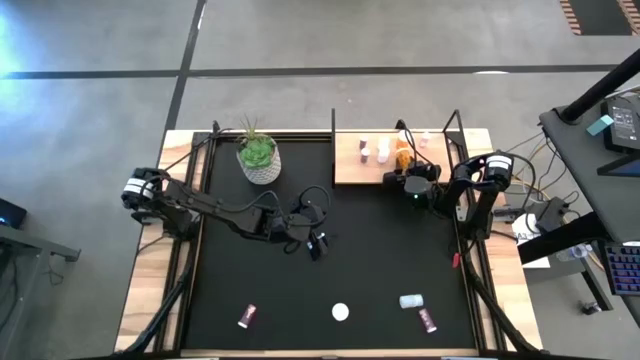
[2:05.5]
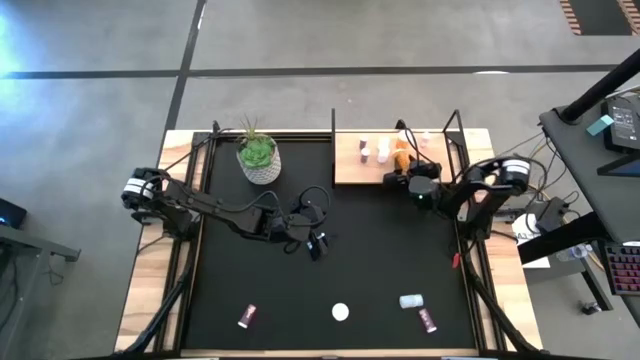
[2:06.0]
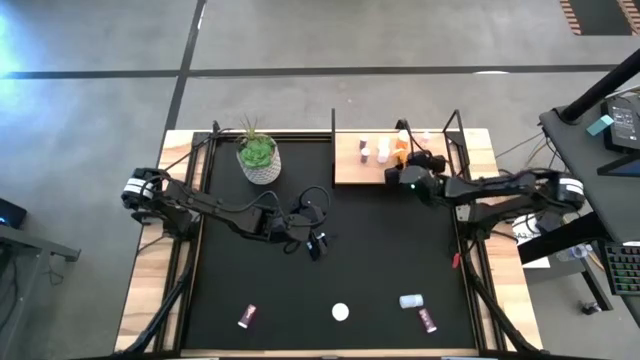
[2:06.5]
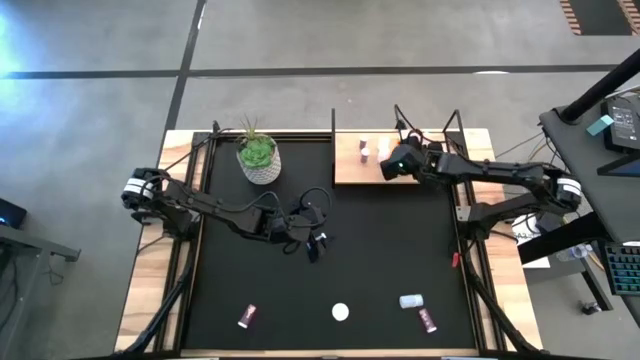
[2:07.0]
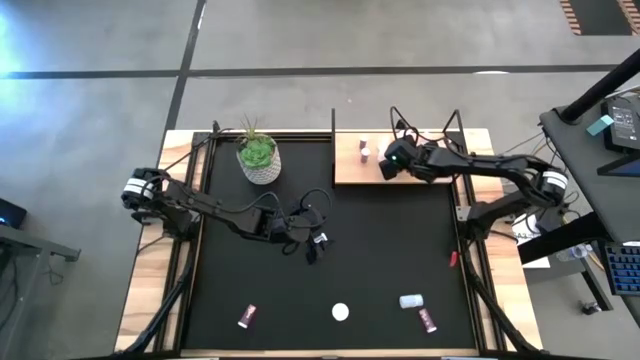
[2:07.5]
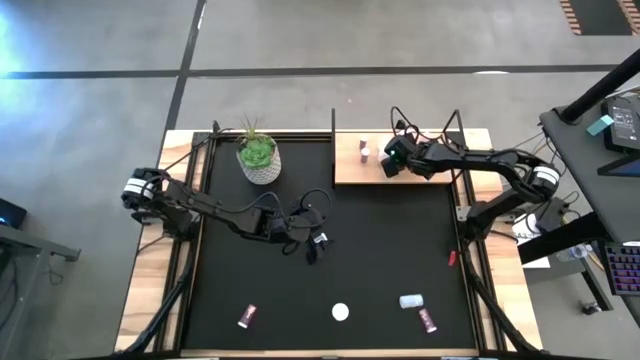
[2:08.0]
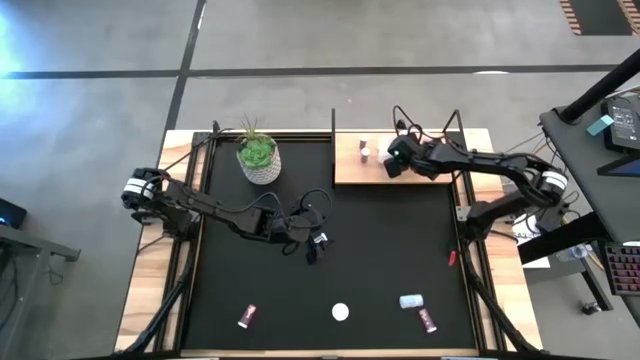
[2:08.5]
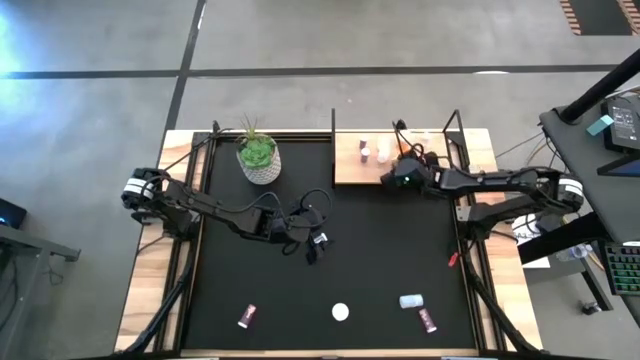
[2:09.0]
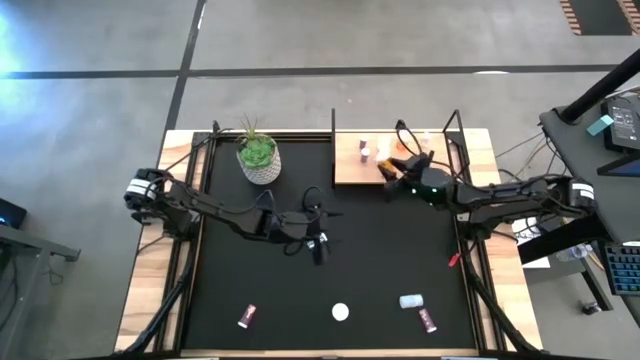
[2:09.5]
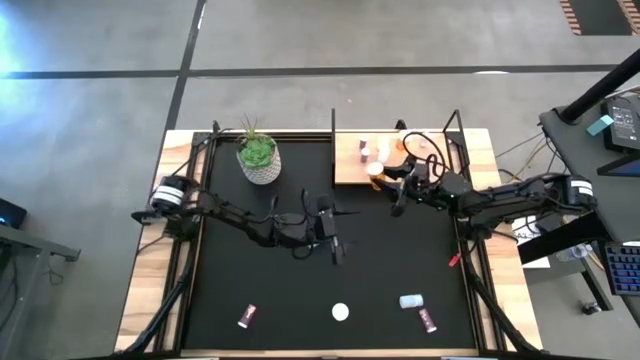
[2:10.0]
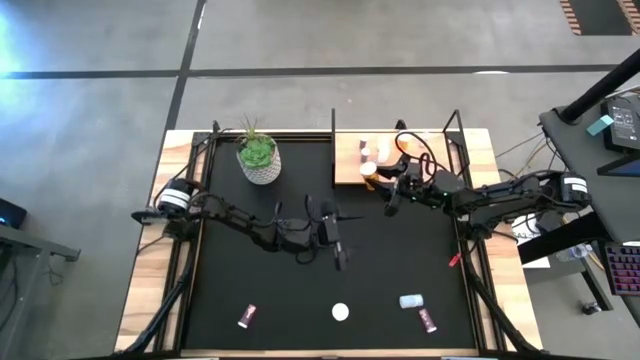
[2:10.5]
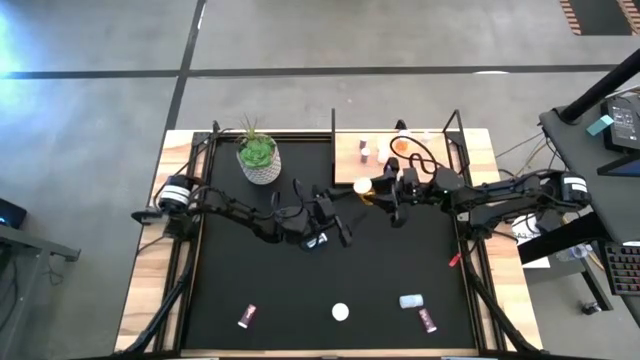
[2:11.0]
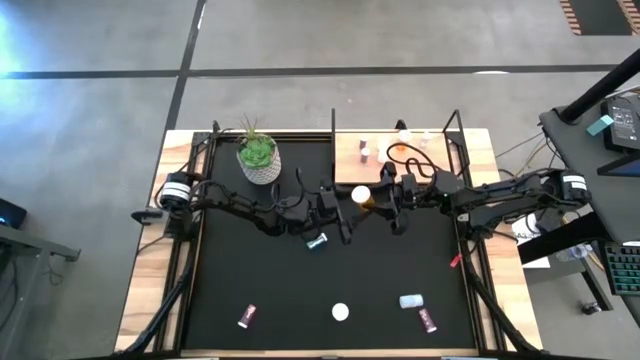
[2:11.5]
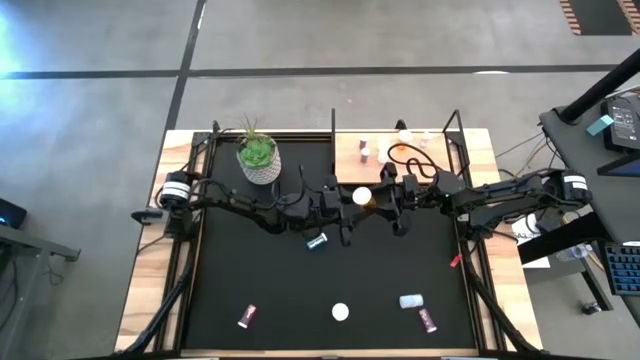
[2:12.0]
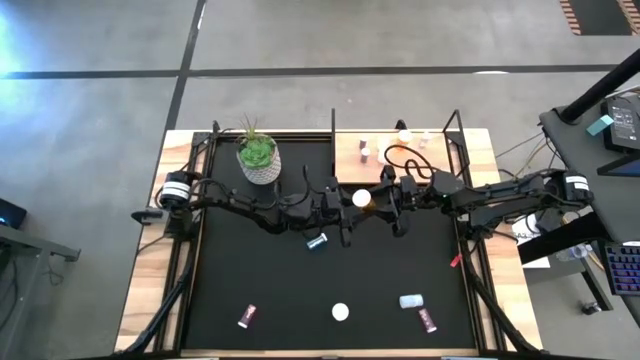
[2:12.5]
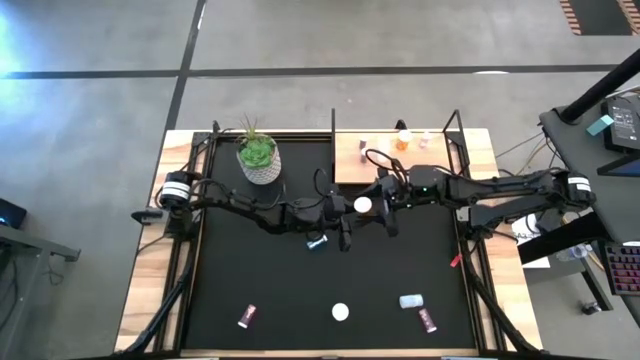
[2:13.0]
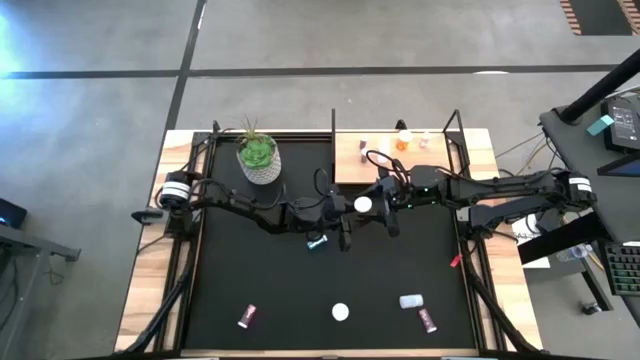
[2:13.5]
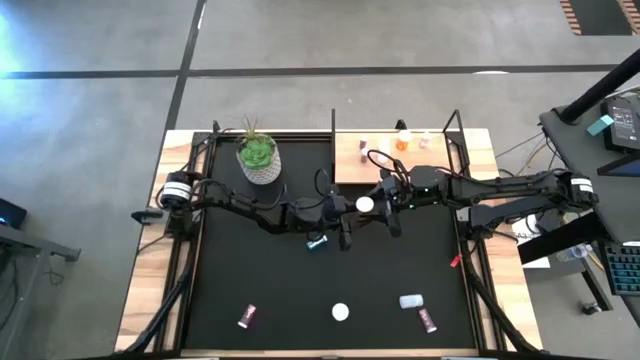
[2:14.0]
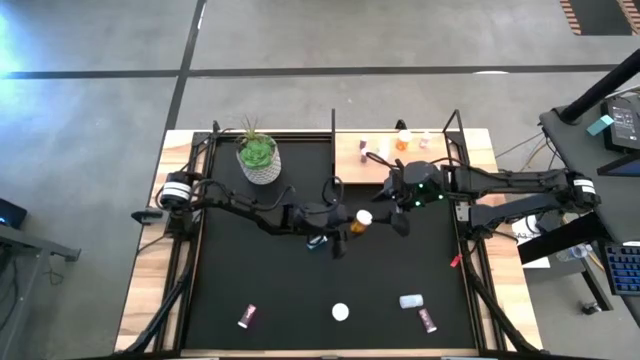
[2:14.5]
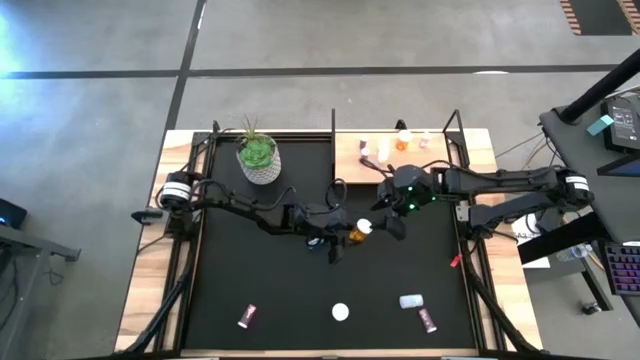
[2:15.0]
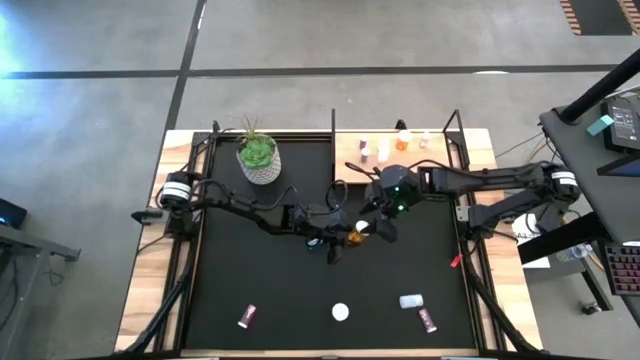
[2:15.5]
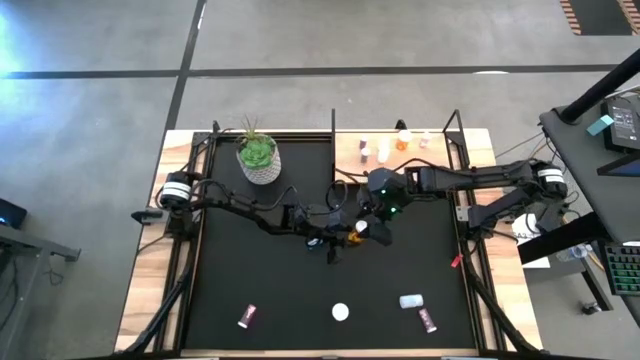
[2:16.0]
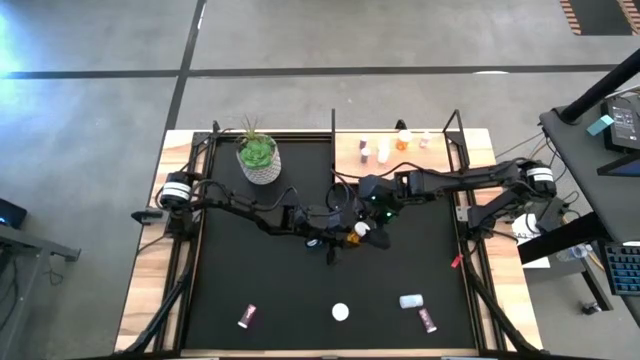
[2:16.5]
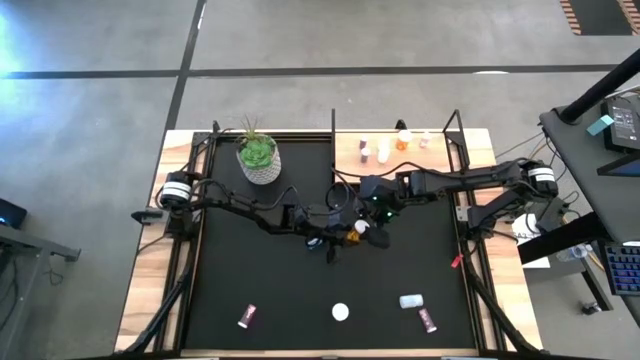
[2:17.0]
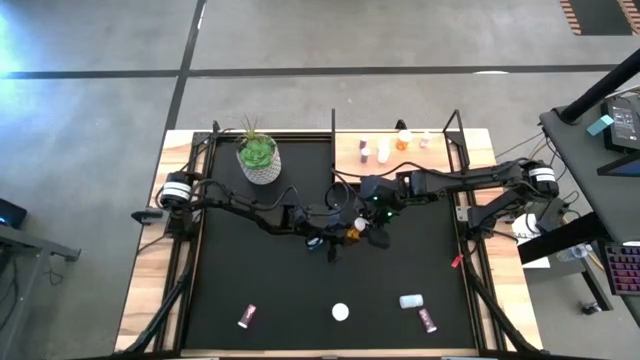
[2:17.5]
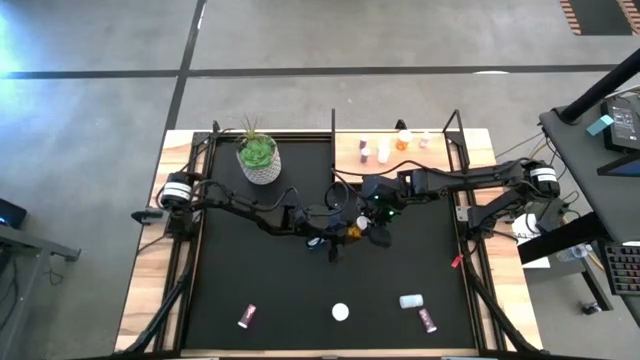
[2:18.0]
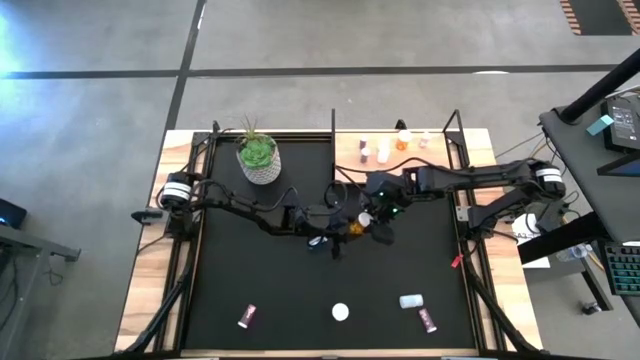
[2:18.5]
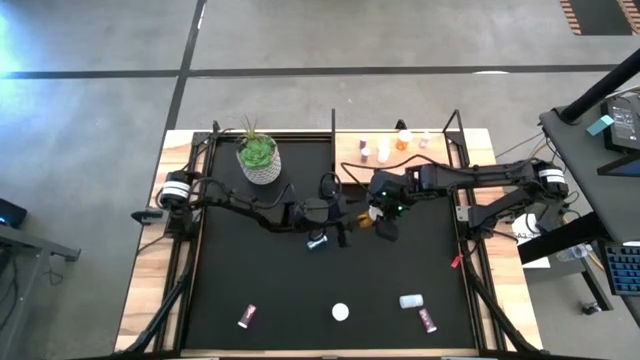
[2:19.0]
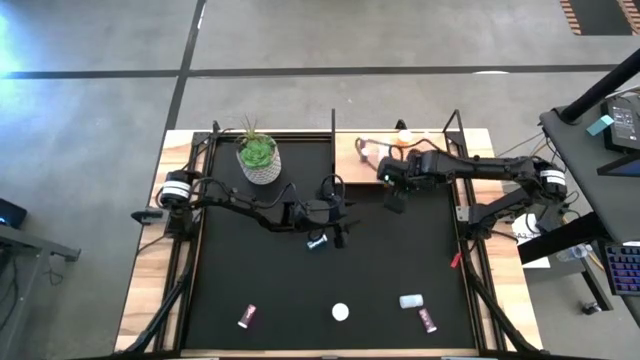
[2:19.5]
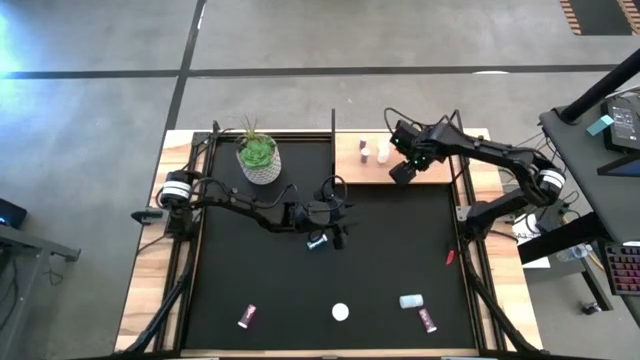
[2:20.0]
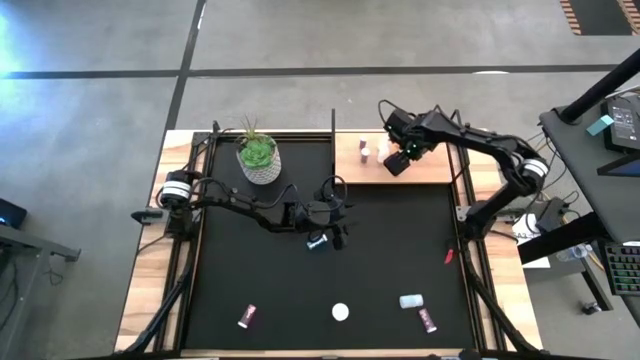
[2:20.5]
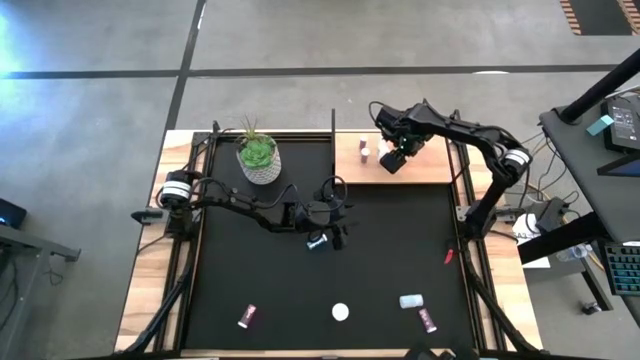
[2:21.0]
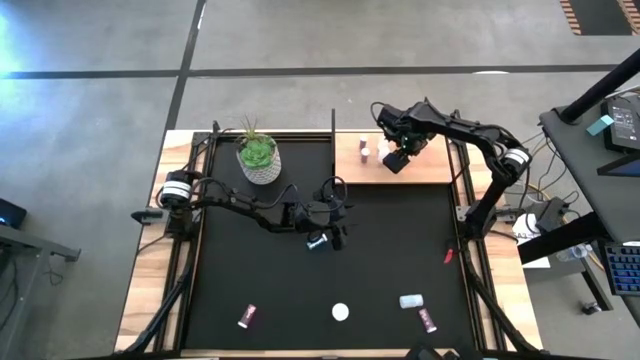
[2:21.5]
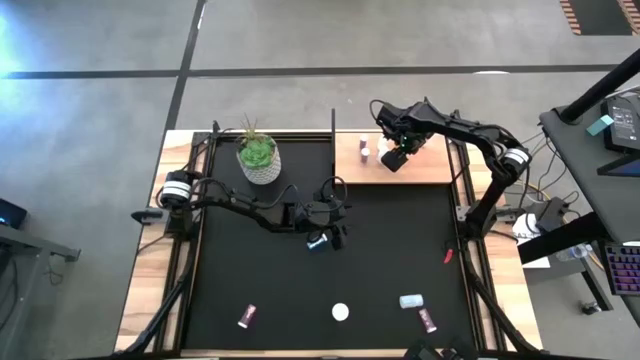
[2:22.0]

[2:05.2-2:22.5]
Task: Pick and place medicine bottles onto shelf by color
Put the left orange pill bottle on the shelf aligned with the other orange pill bottle

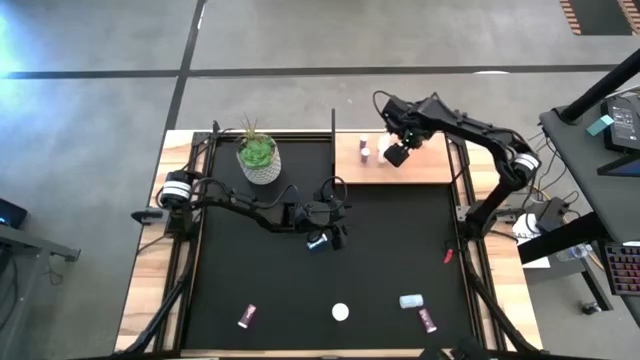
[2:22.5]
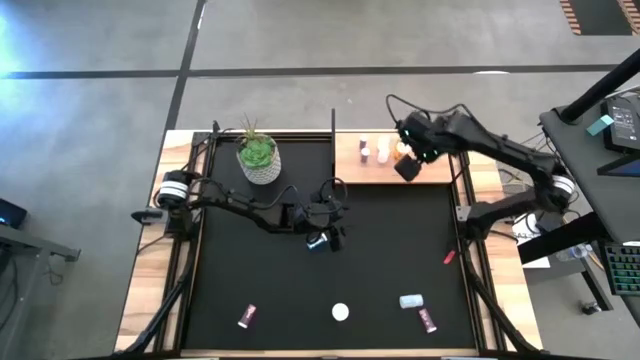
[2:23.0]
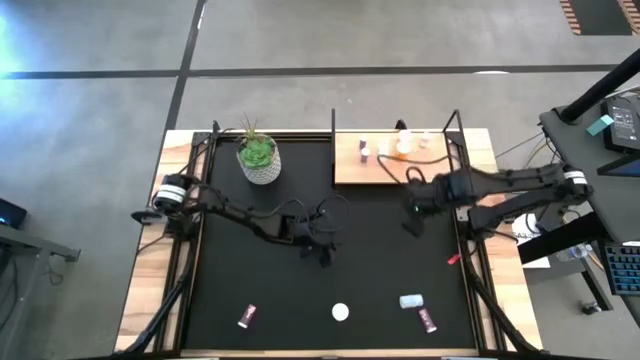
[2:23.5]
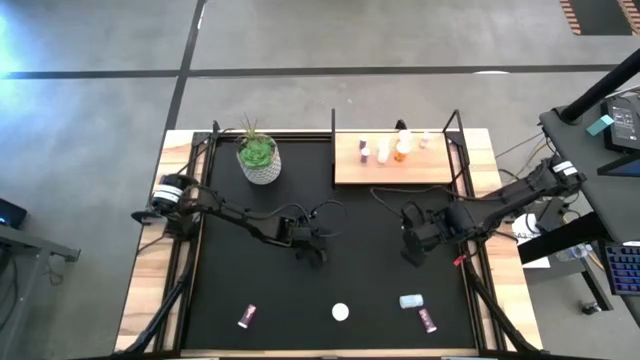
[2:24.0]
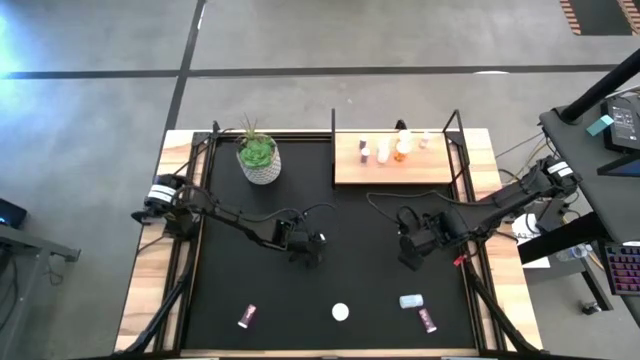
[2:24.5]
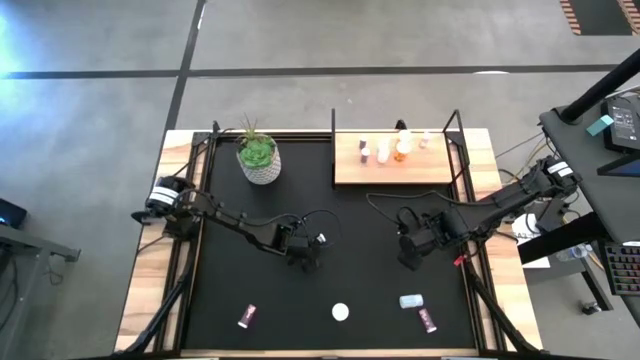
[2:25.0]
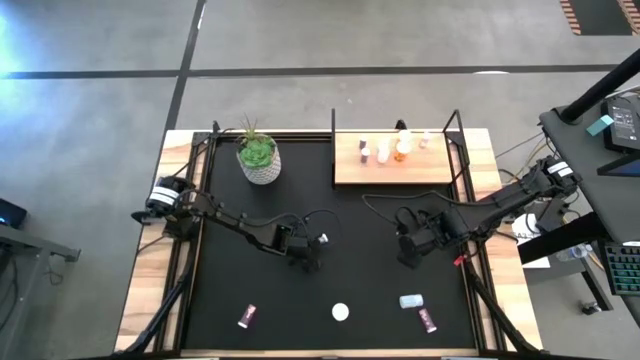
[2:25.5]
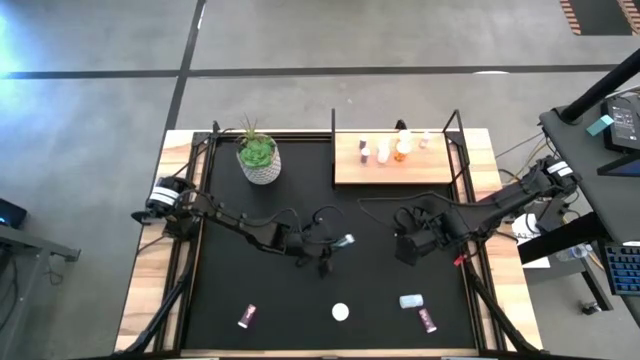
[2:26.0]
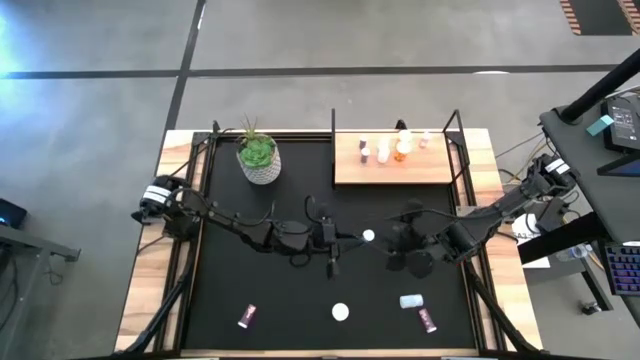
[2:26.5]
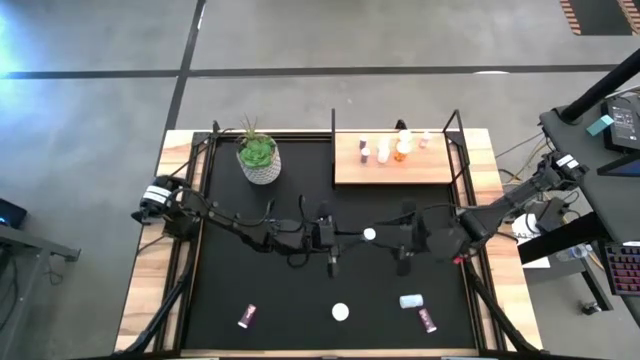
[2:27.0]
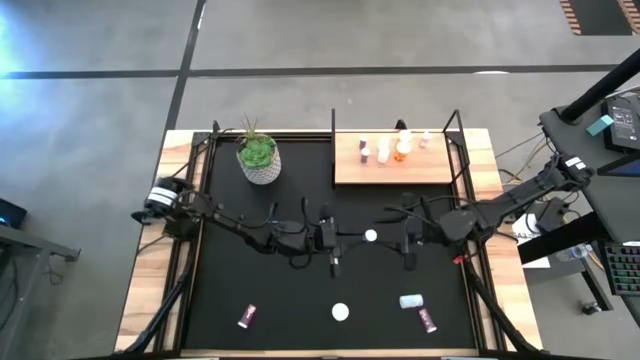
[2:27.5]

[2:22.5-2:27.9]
Put the blue pill bottle on the shelf aligned with the other blue pill bottles
